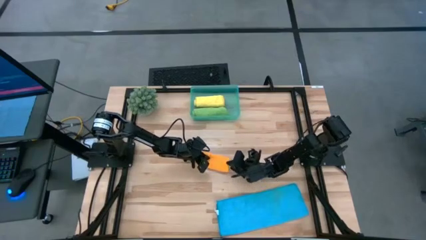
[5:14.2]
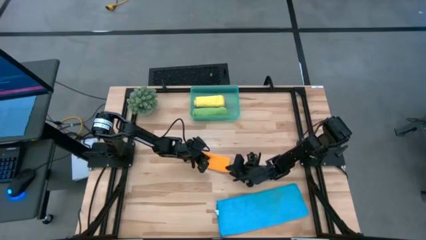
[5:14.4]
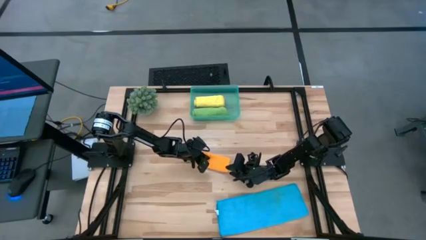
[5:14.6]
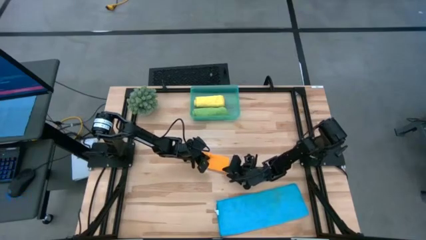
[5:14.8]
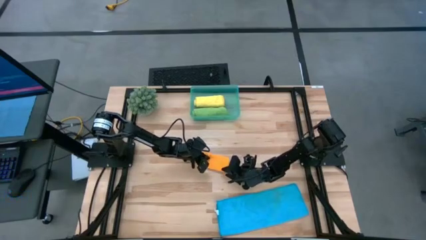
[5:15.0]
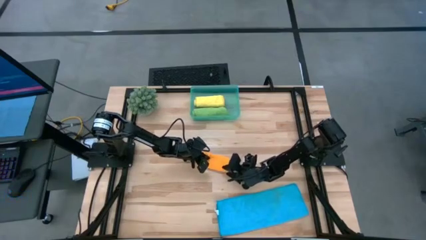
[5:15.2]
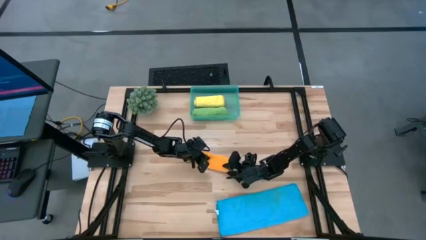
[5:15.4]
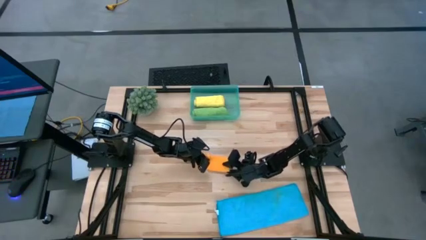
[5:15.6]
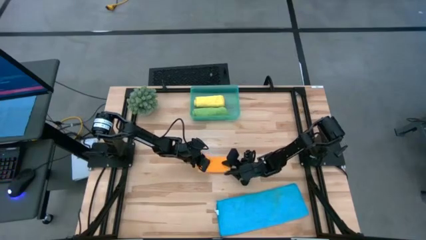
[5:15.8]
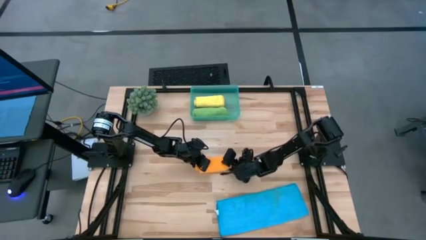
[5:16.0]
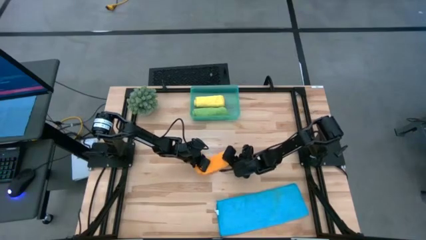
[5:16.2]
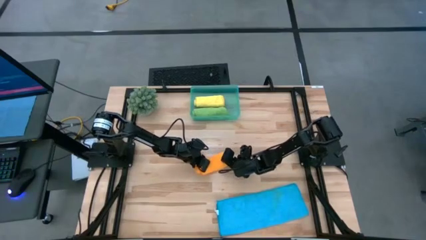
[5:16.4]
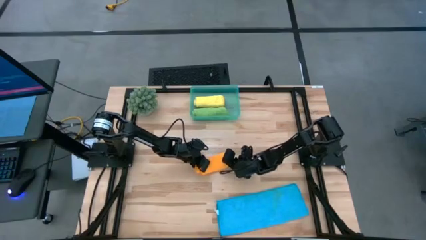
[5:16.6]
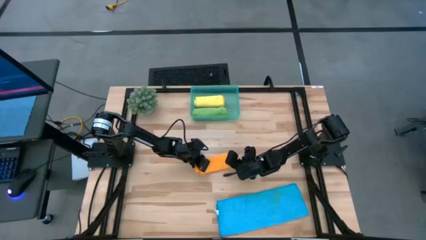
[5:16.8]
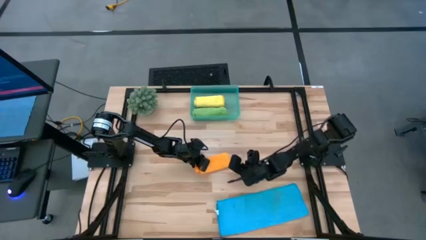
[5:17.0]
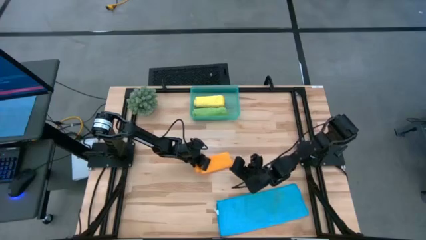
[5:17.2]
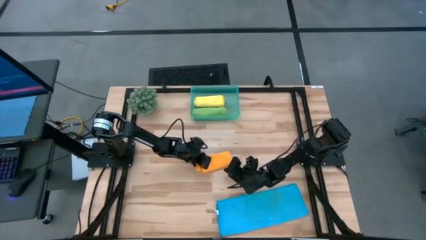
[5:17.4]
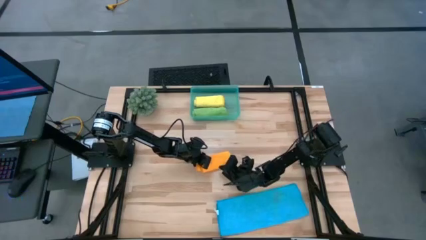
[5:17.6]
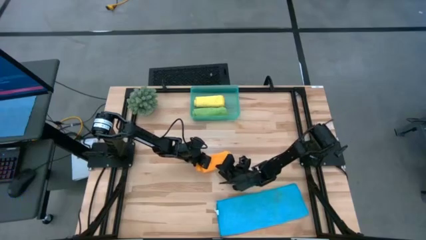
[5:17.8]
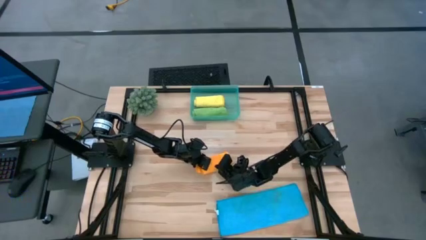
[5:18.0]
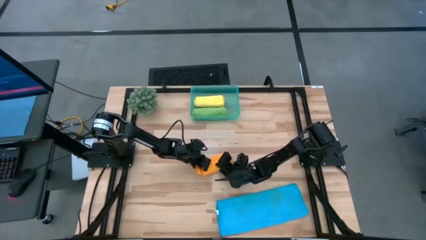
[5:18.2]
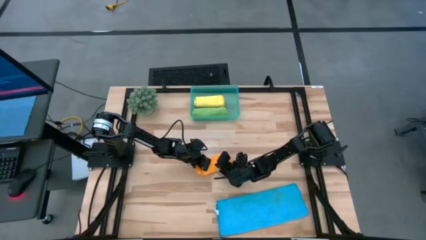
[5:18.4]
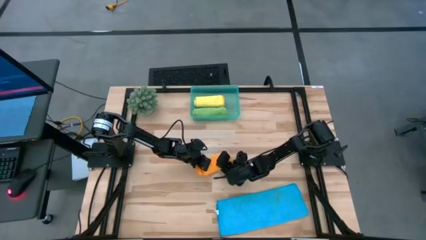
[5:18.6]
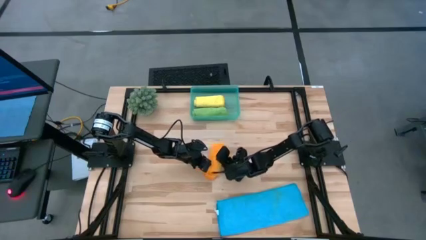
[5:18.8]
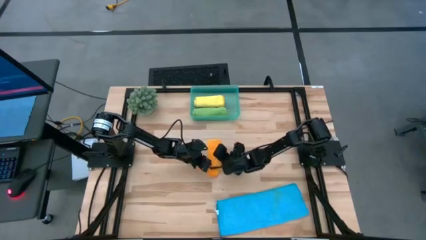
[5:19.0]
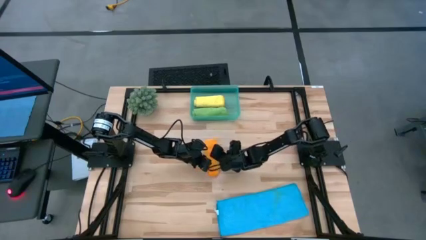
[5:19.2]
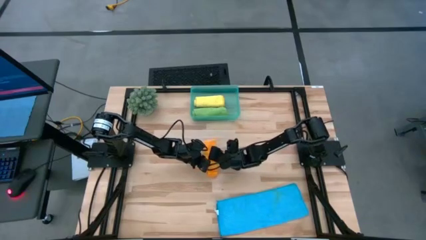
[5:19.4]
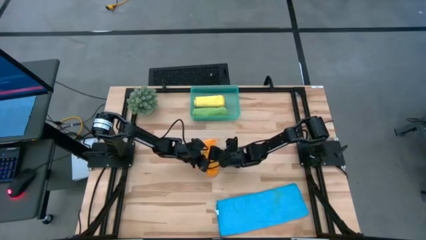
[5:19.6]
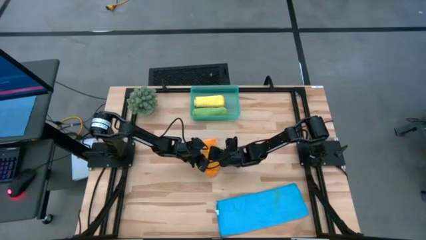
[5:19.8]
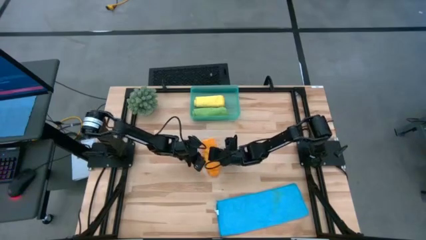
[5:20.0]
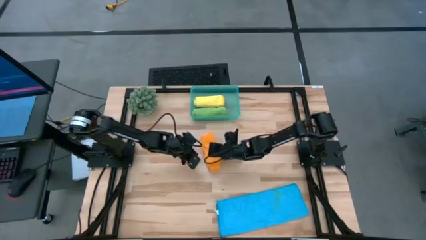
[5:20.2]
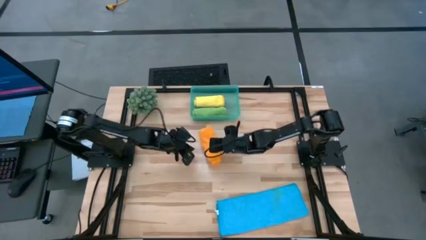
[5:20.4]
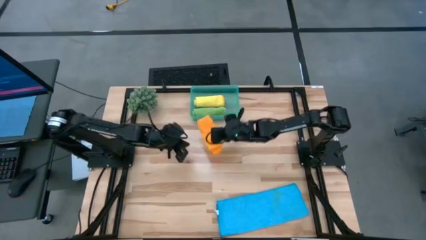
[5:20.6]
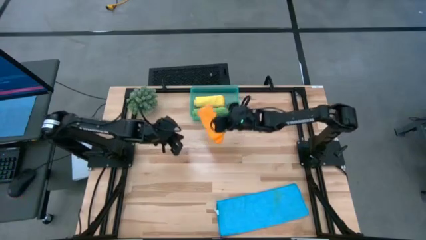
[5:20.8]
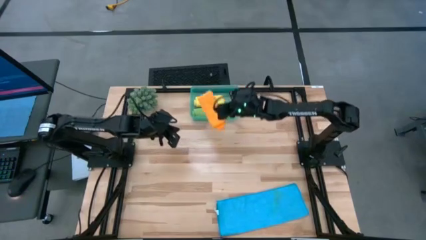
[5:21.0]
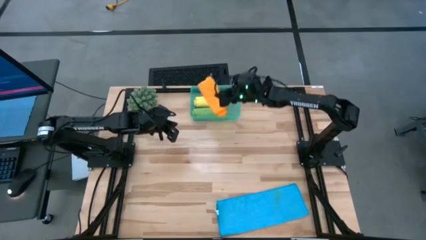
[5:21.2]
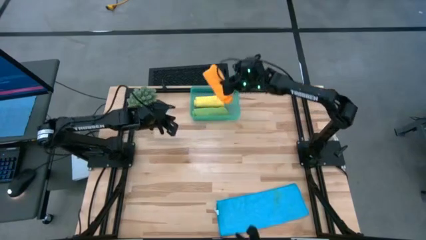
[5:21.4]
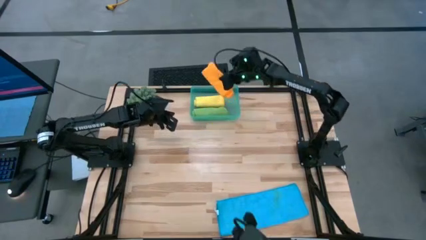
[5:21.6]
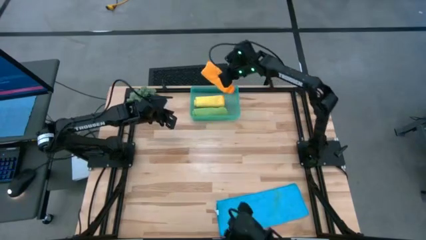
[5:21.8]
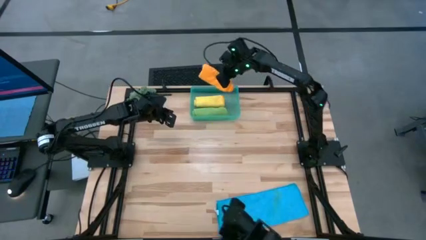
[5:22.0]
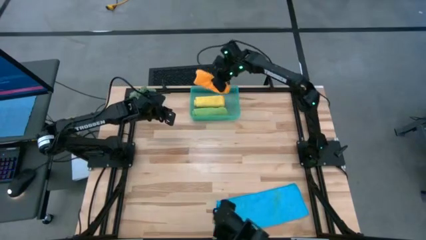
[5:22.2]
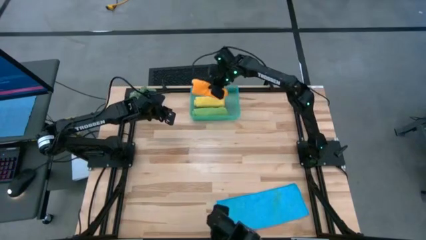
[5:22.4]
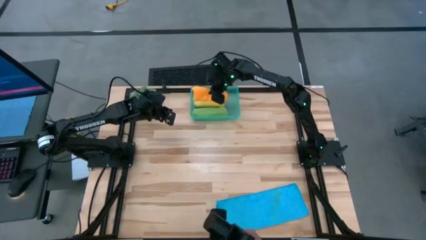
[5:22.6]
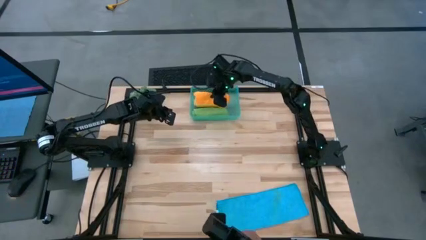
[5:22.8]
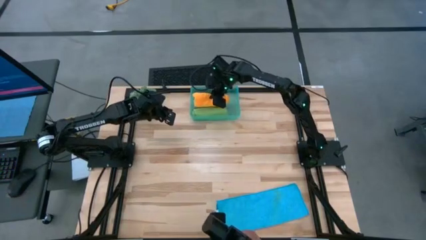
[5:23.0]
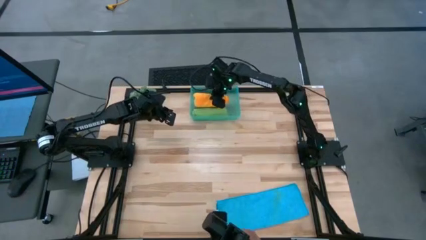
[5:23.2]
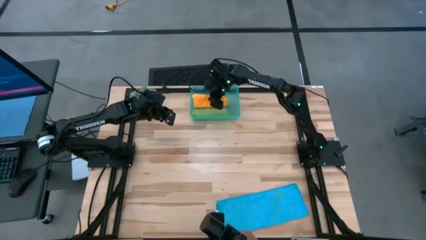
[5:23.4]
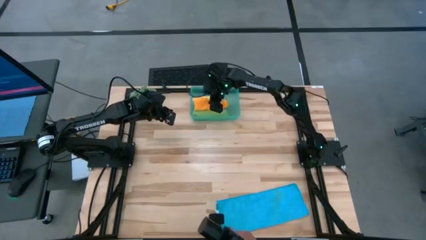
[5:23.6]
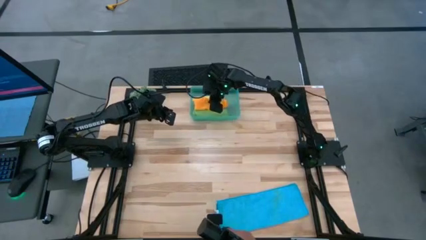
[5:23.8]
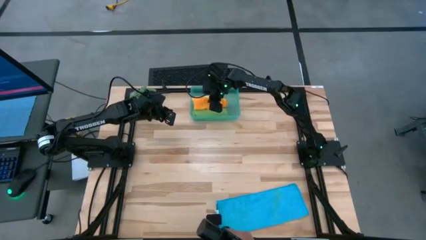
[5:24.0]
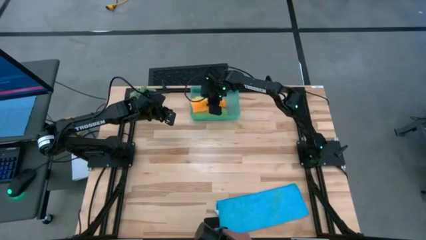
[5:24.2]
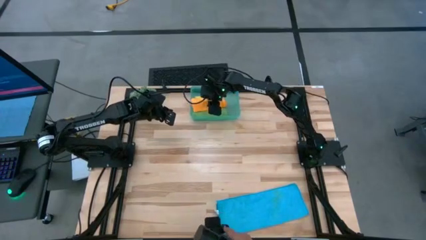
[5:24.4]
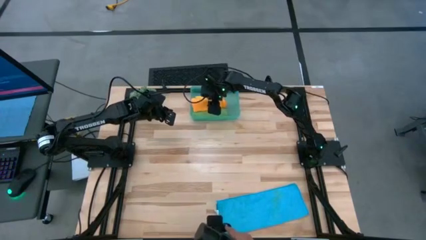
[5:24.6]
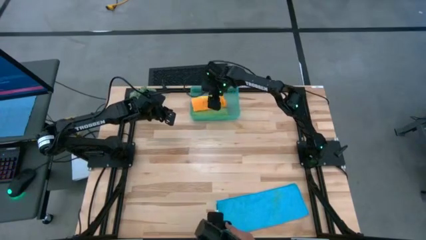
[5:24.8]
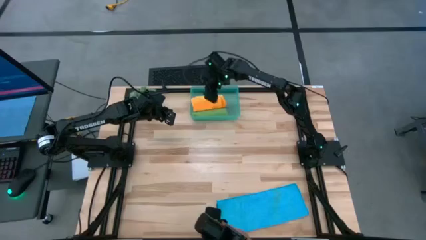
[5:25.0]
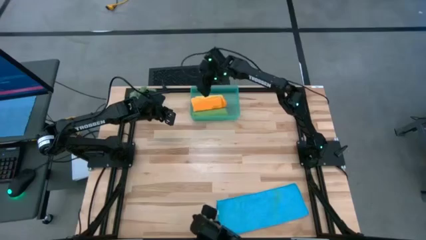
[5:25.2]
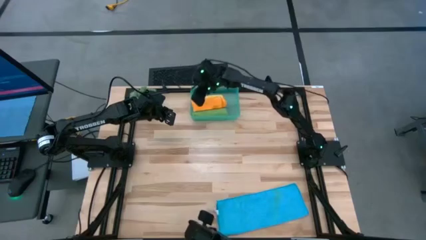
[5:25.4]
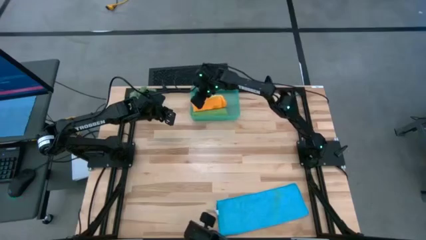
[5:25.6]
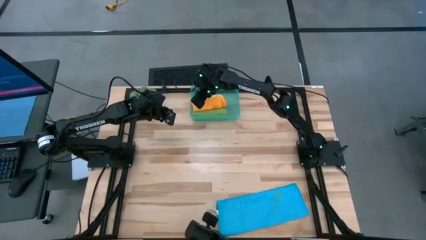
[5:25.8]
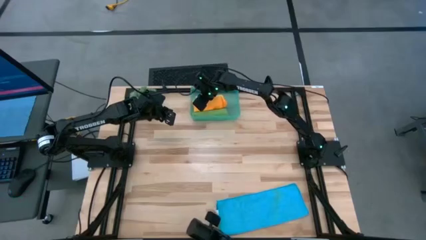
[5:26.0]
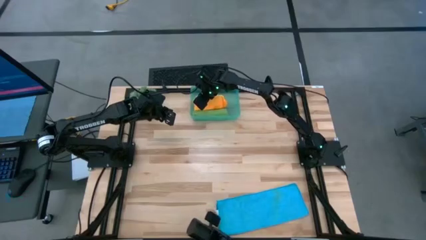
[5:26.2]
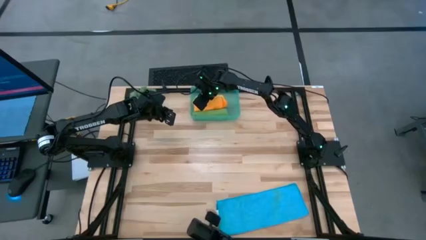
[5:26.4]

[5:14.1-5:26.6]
Task: Roll microfiber towels into tight, uniform cylinder then place into a basket
Put the rolled orange towel into the blue bin

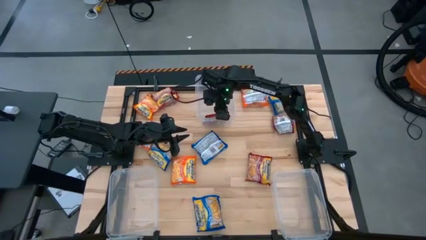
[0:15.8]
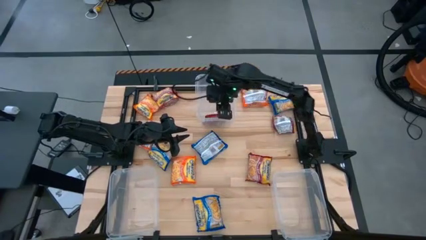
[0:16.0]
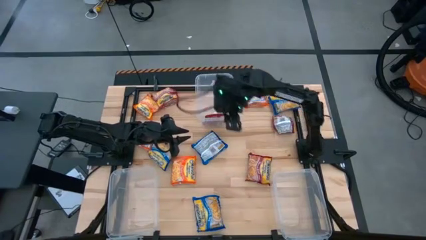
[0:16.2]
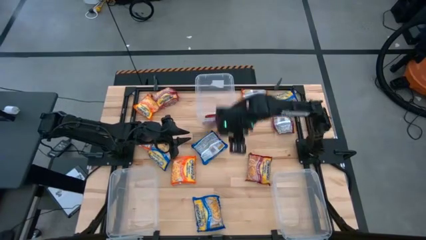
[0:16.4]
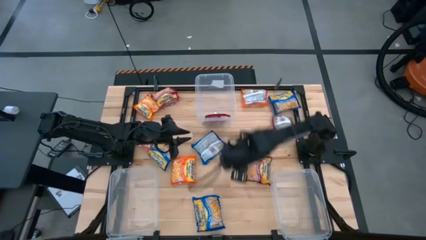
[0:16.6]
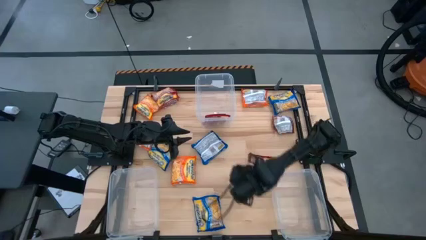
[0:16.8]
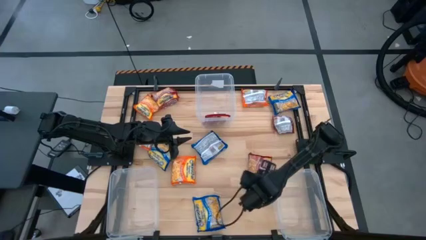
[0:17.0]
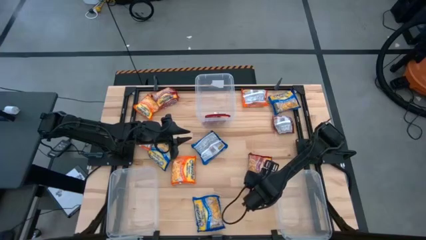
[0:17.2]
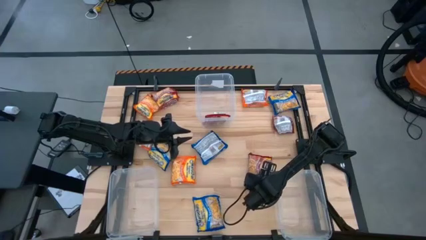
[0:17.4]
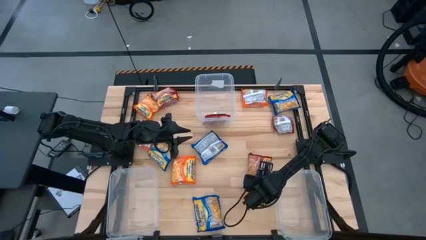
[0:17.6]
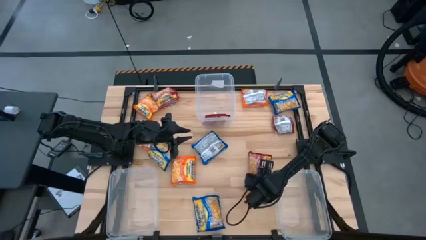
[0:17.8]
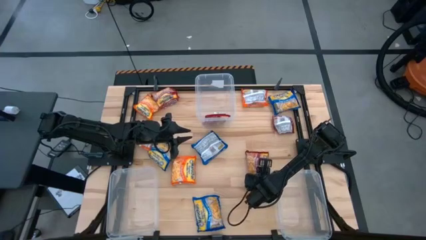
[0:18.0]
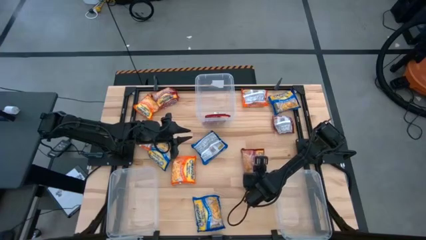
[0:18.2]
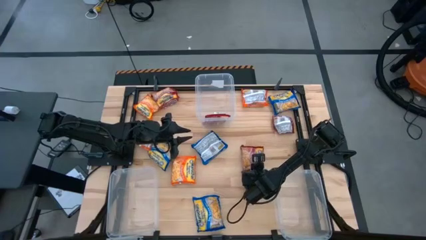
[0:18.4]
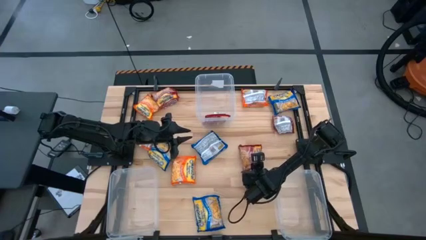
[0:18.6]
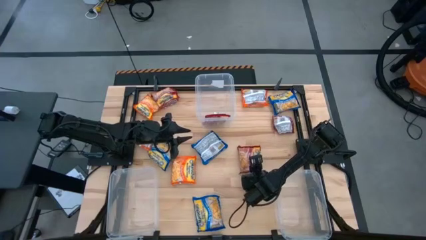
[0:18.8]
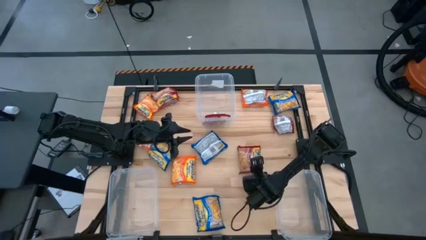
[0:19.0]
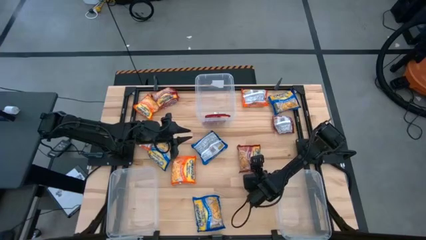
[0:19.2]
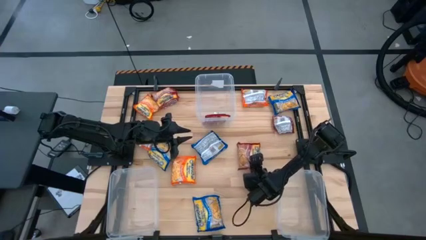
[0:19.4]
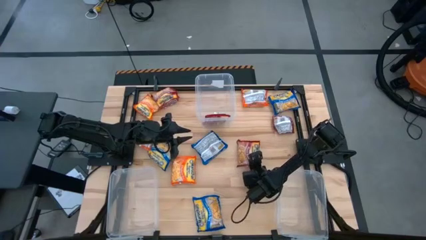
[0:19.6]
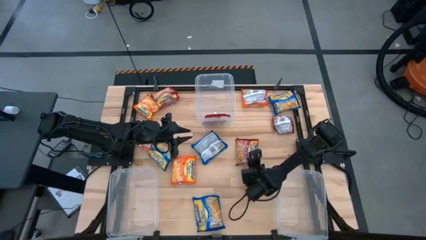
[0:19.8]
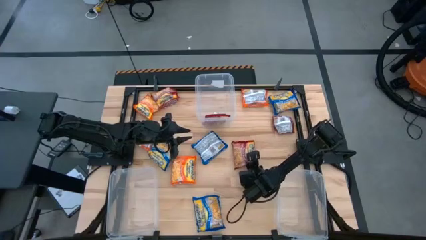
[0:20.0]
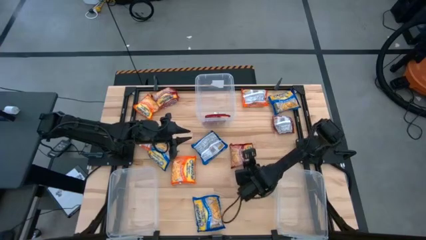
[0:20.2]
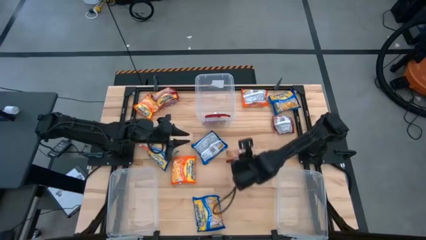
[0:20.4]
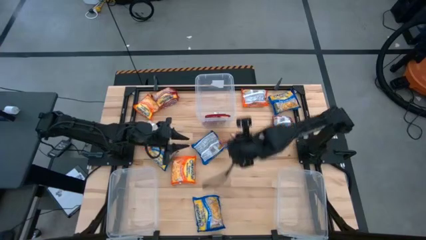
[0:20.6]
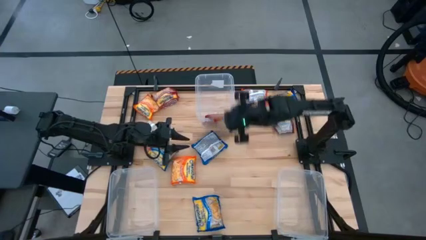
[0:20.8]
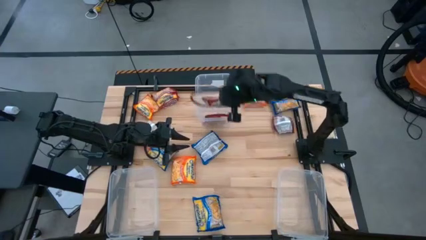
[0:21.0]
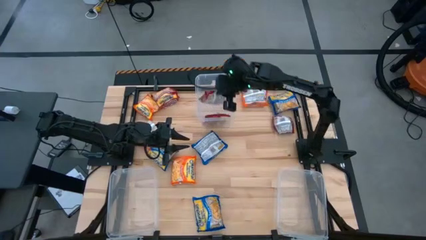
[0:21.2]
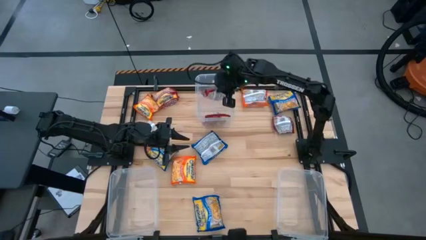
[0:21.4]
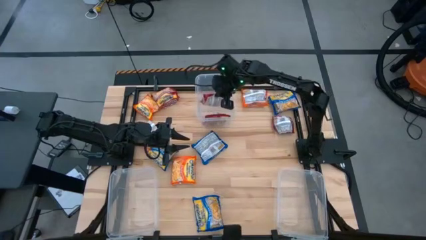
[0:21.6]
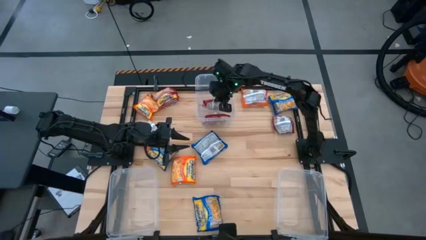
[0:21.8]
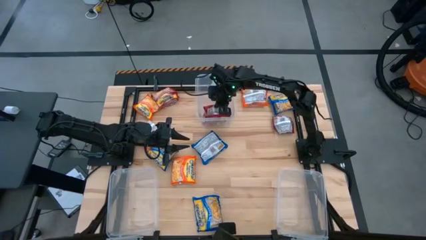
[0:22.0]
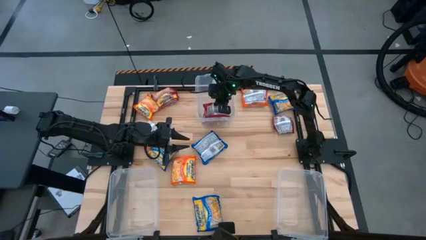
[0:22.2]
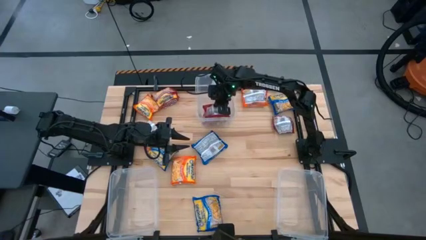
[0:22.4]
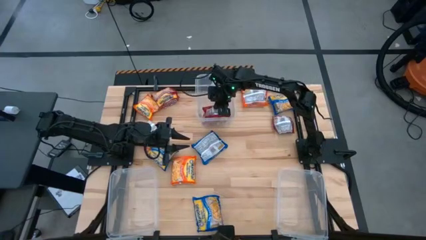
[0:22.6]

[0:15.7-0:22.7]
Task: Sort Maruchan noodles
Put the red noodle pack into the top transparent bin
